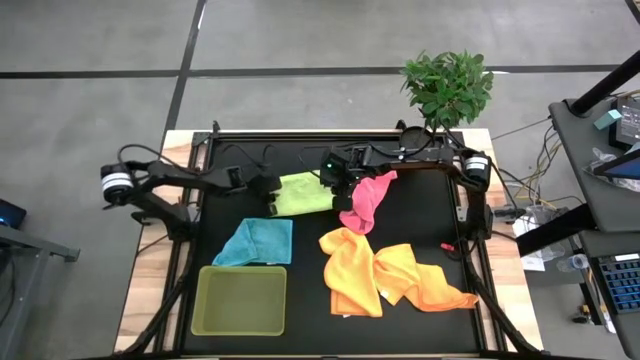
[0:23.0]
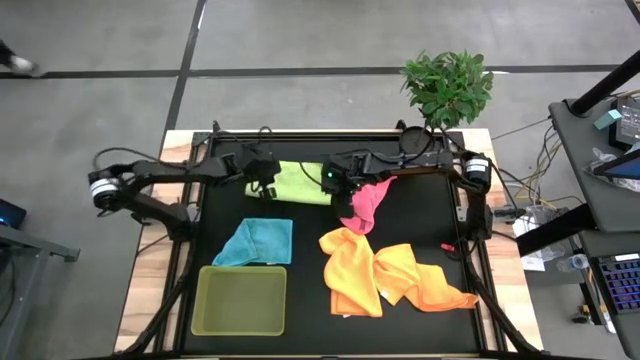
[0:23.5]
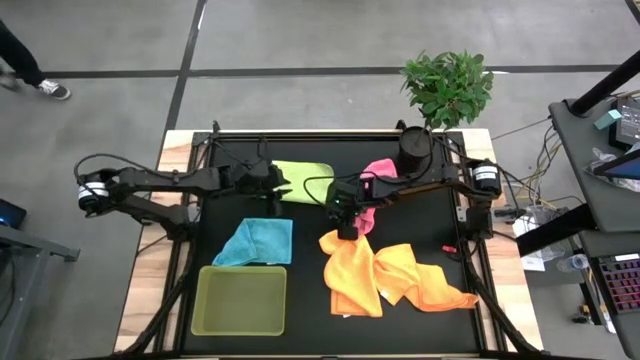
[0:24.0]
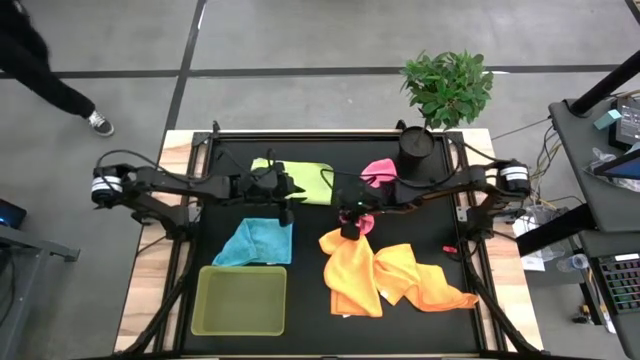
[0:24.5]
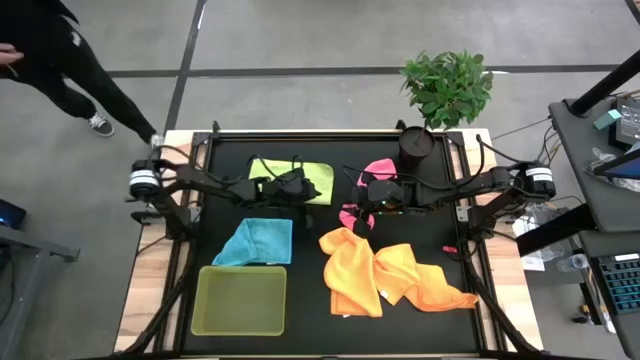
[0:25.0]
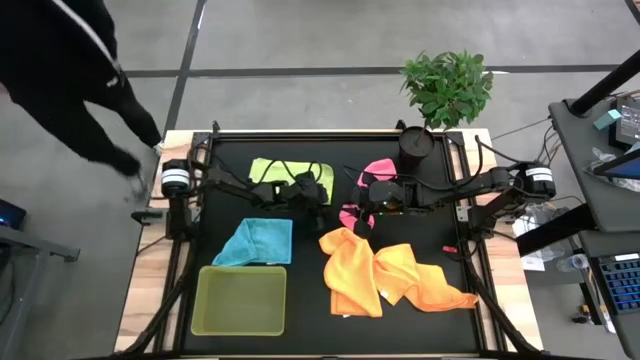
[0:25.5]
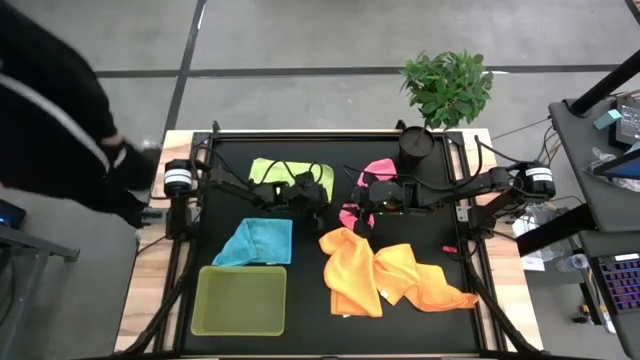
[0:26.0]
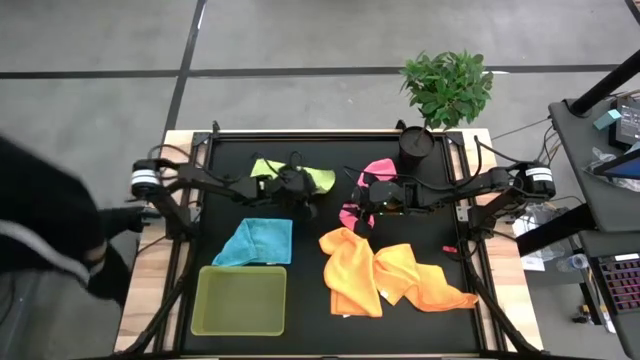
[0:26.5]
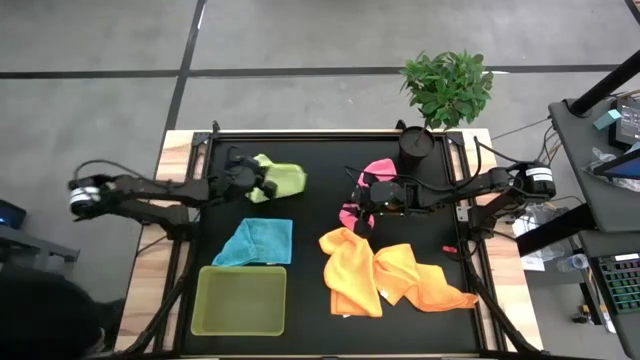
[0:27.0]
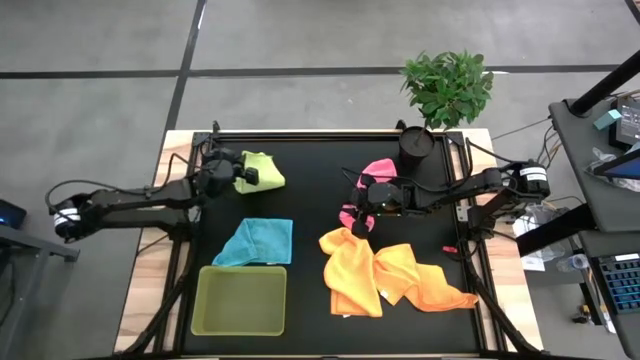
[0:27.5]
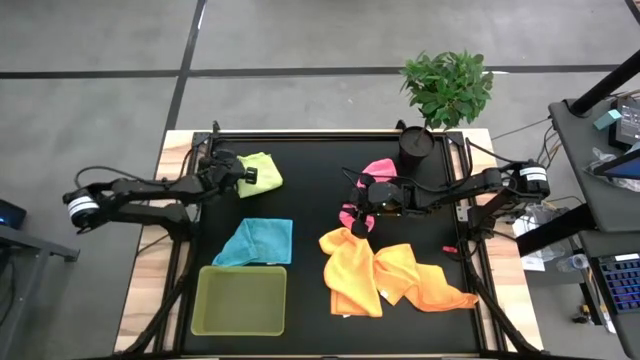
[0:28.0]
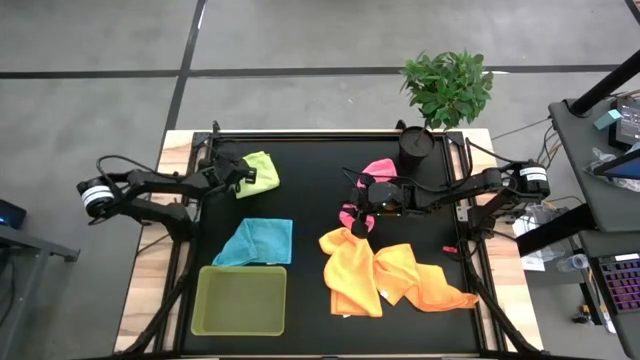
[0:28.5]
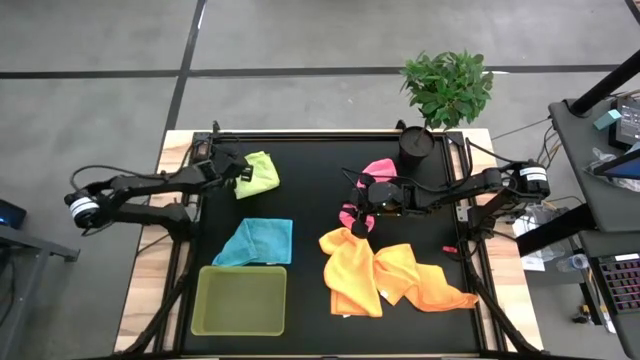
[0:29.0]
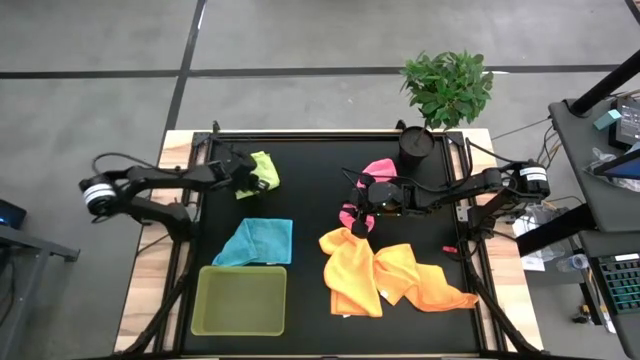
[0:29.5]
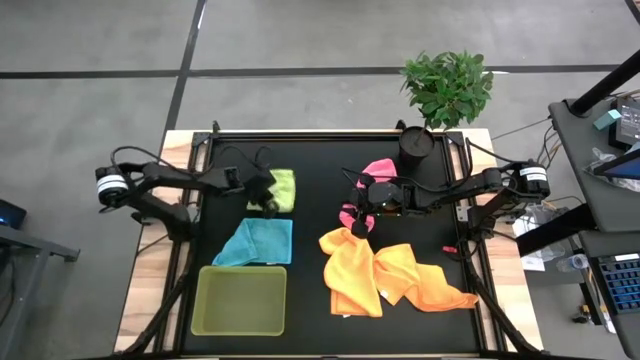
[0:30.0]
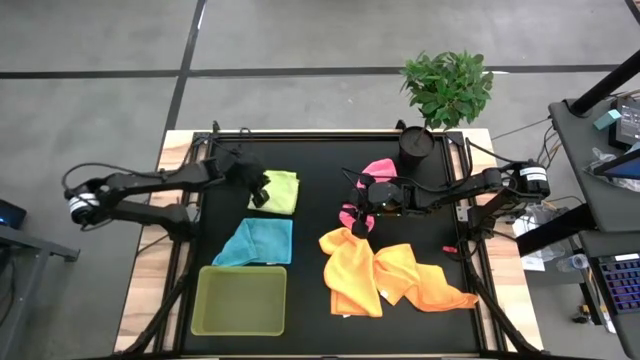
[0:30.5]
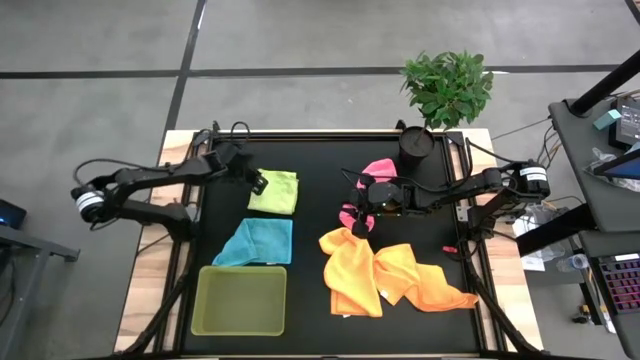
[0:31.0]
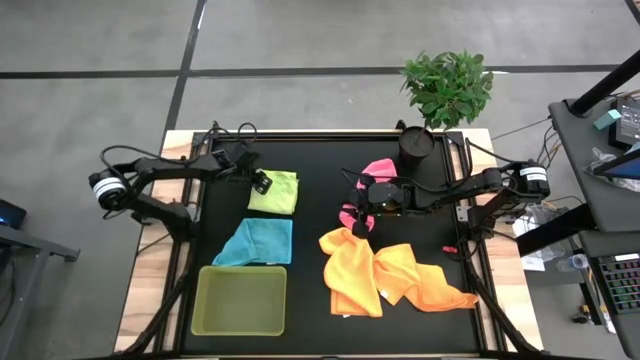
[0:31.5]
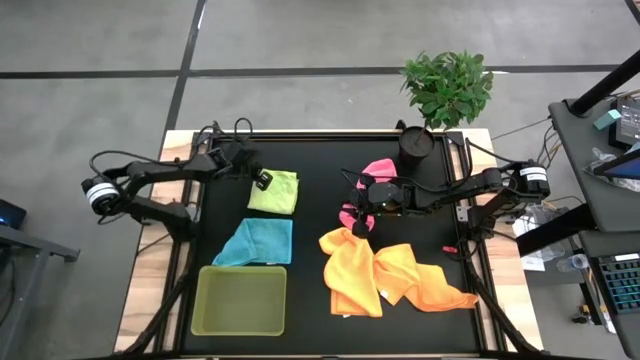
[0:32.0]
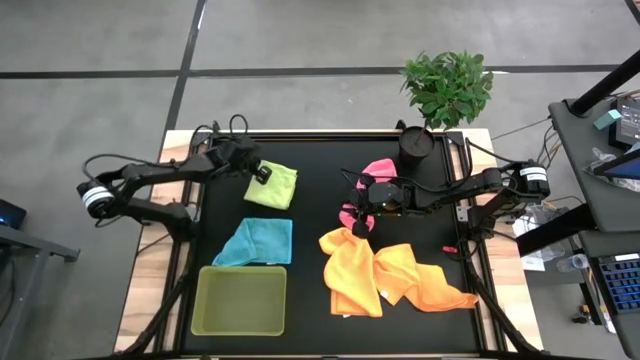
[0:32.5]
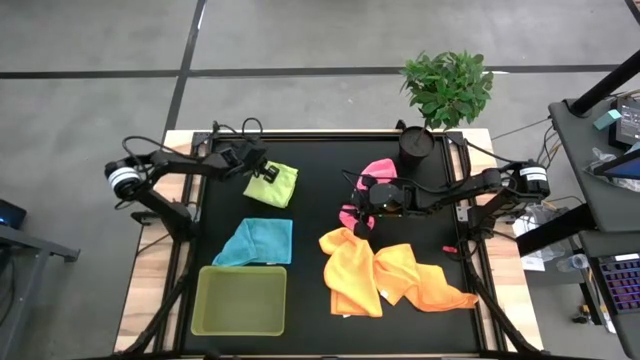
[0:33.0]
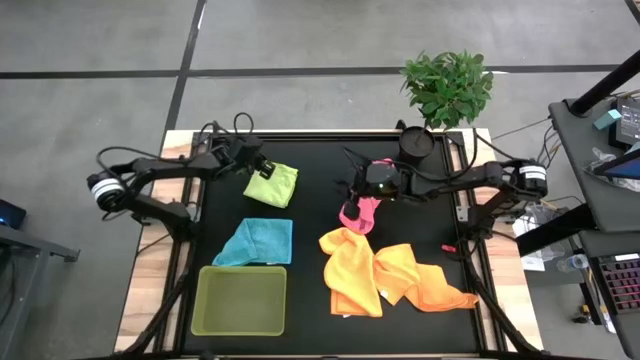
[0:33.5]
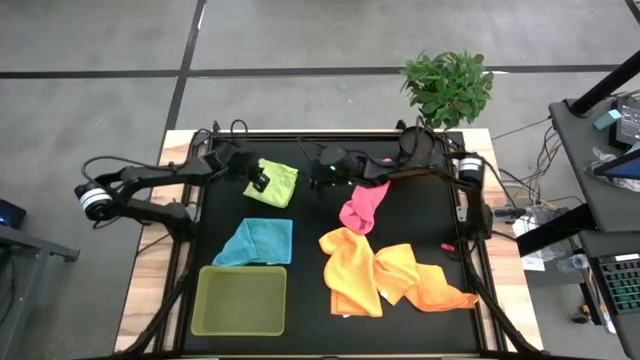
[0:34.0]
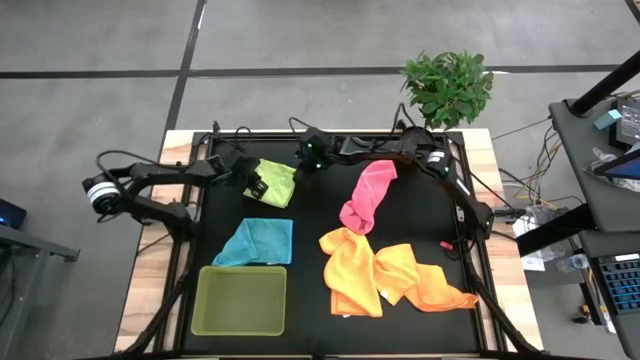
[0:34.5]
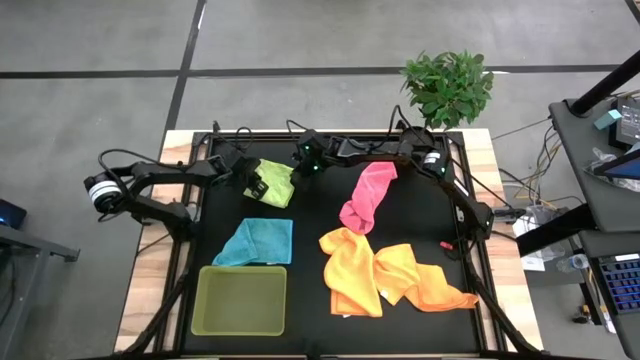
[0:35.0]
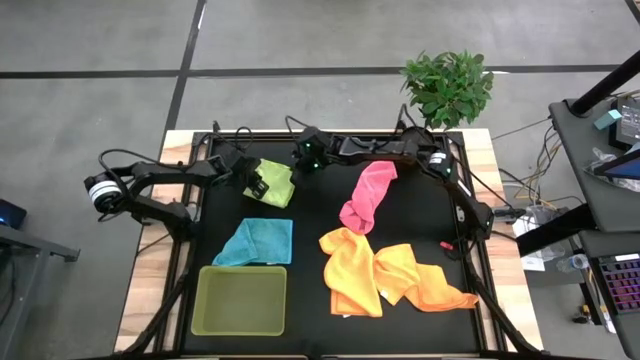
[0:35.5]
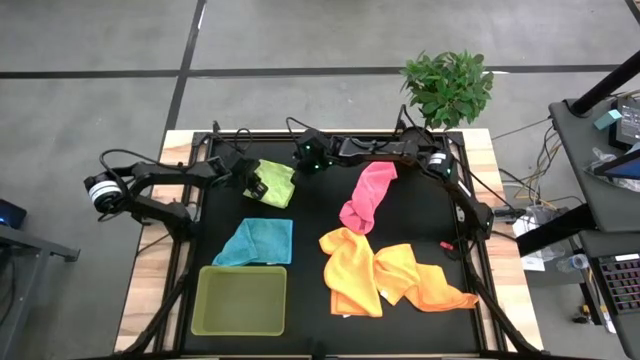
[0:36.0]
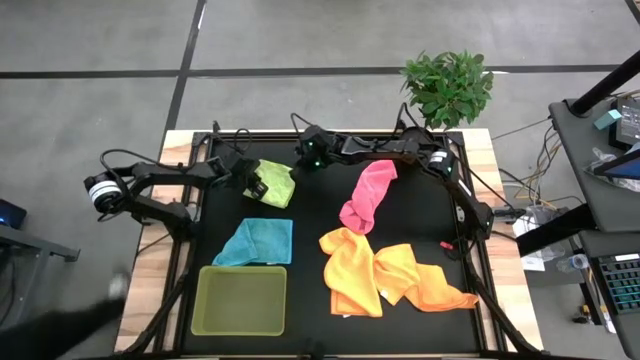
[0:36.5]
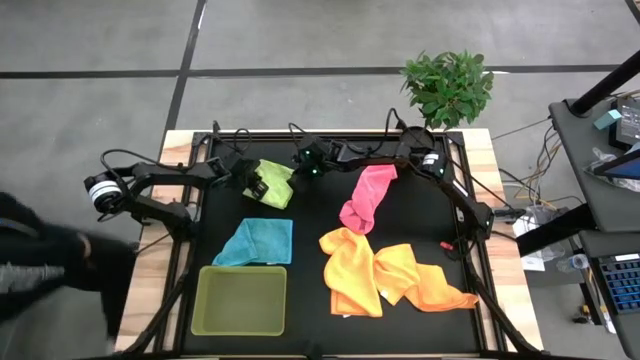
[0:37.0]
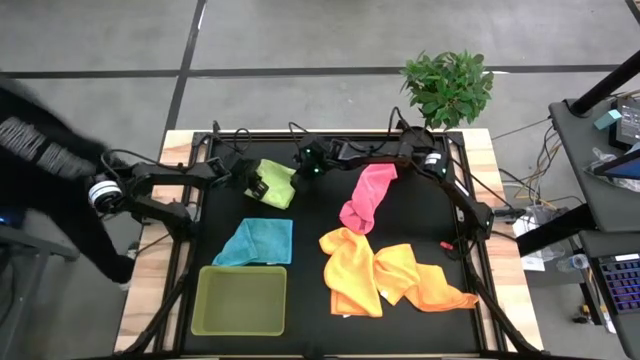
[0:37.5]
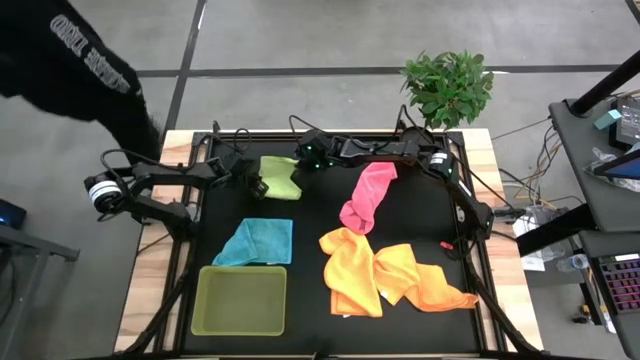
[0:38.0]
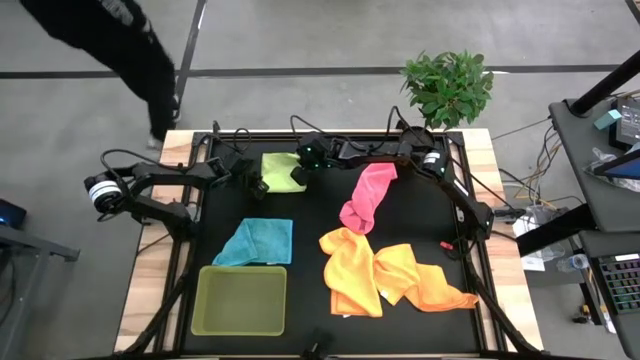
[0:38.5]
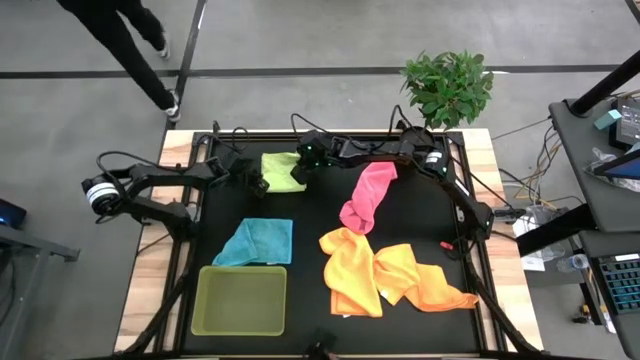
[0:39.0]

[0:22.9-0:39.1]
Task: Fold microfiber towels
Fold the green microfiber towel

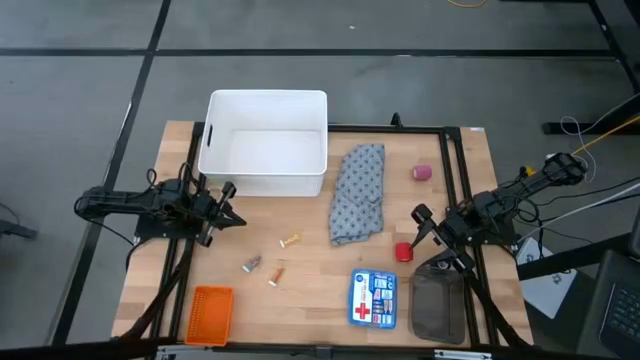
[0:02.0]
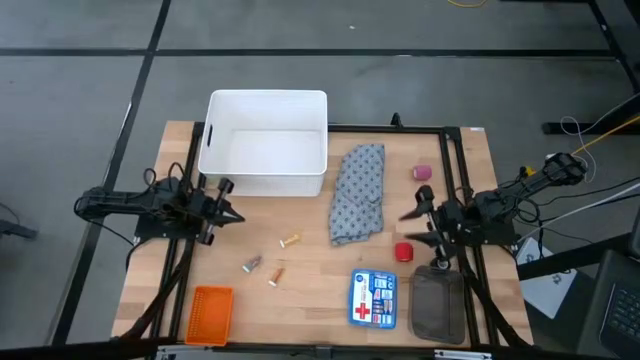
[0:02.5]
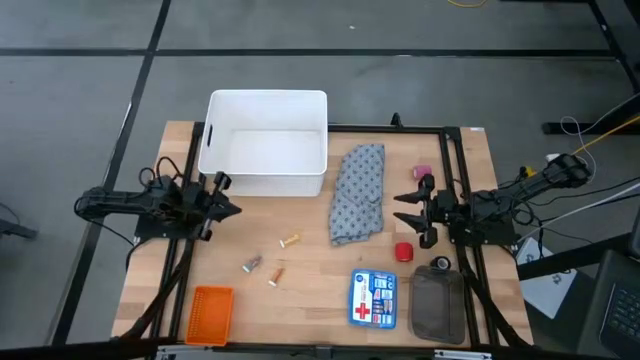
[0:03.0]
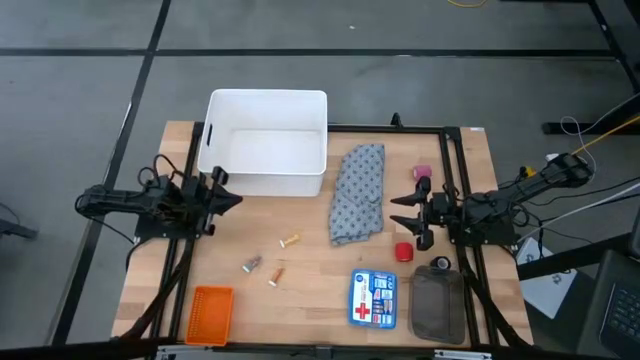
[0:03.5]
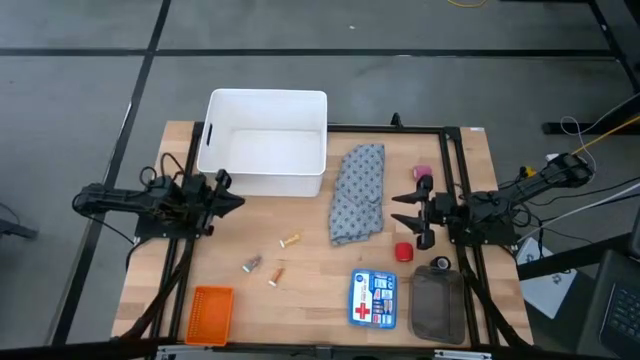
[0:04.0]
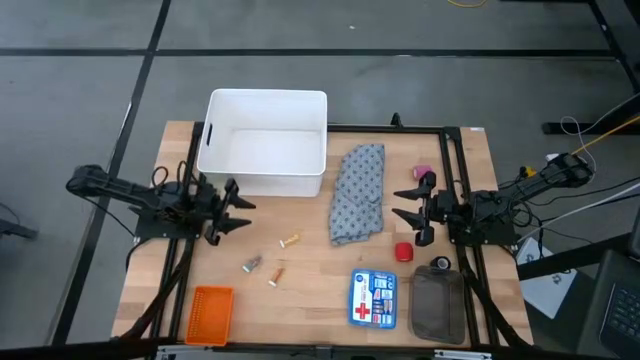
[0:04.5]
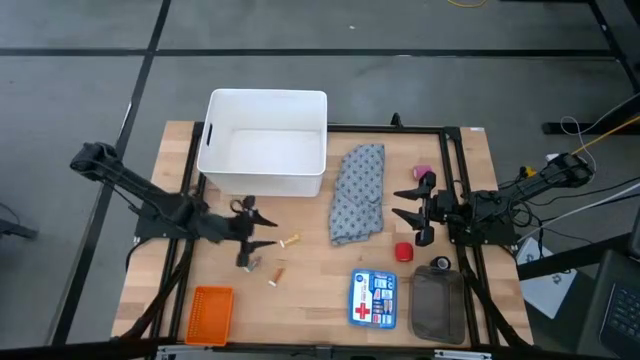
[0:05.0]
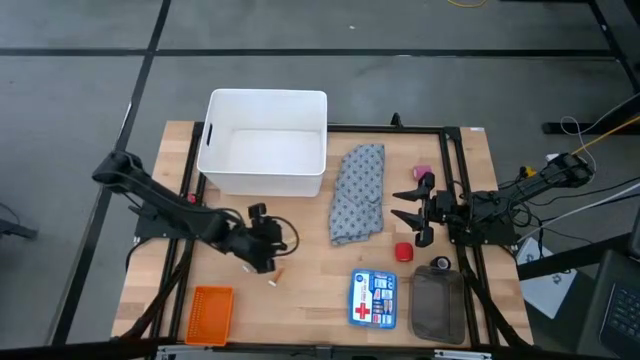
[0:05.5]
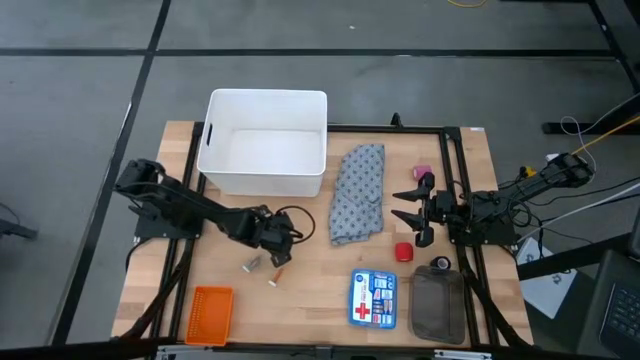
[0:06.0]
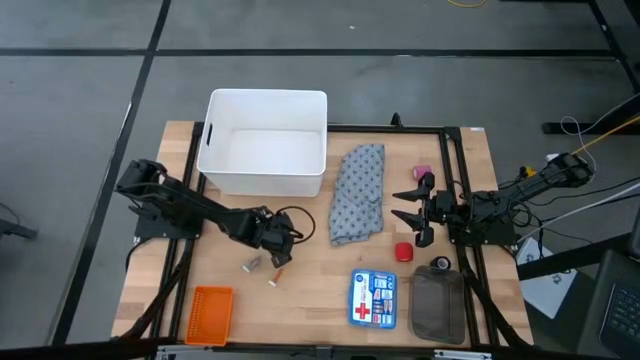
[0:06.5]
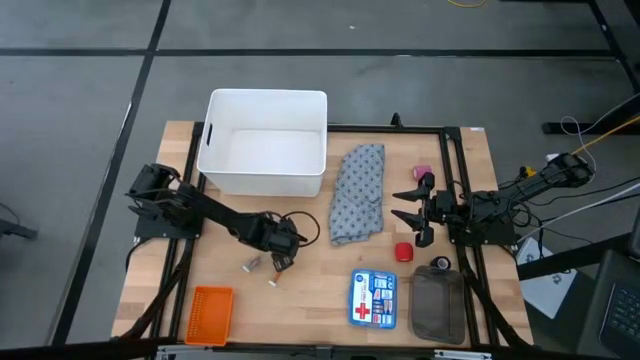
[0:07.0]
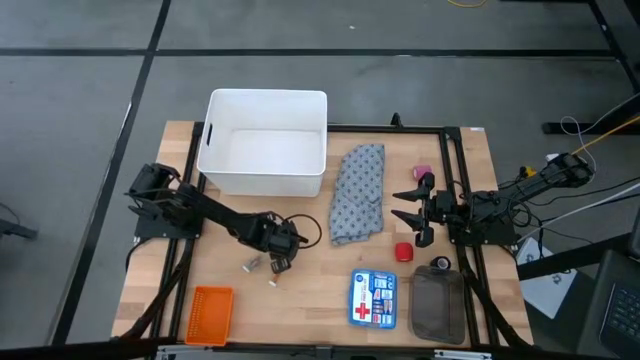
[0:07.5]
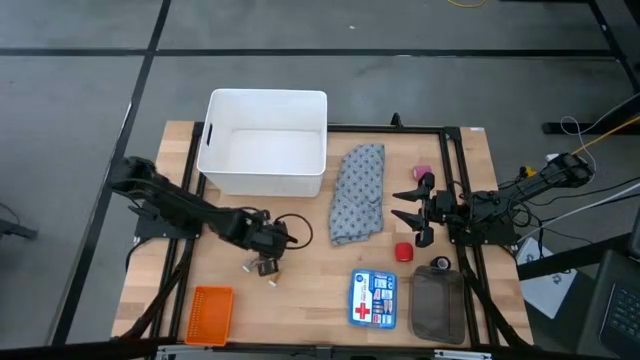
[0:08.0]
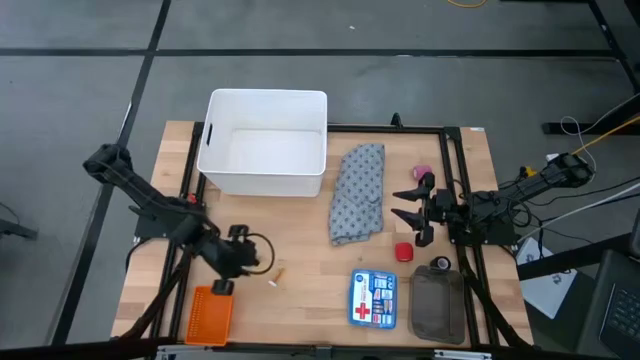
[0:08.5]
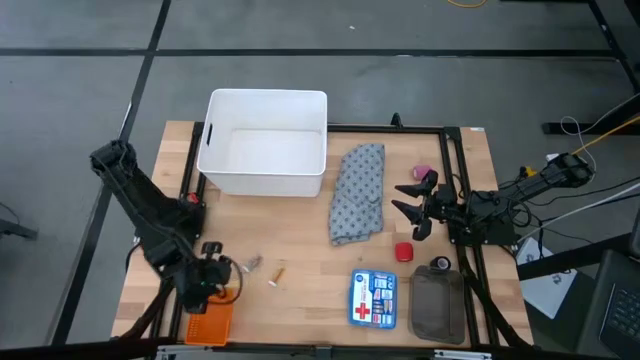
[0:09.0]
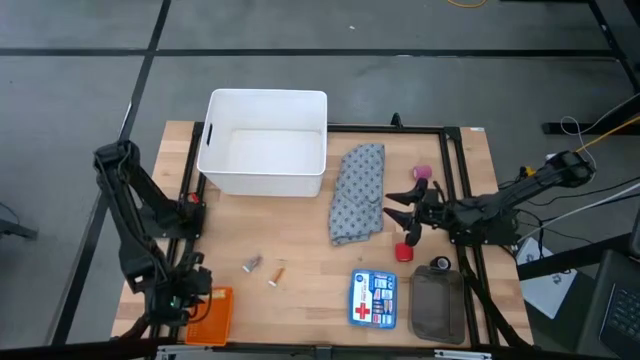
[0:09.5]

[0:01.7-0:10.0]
Task: Pick & place medical supplies in basket/bin
Put the yellow pill bottle into the orange bin
